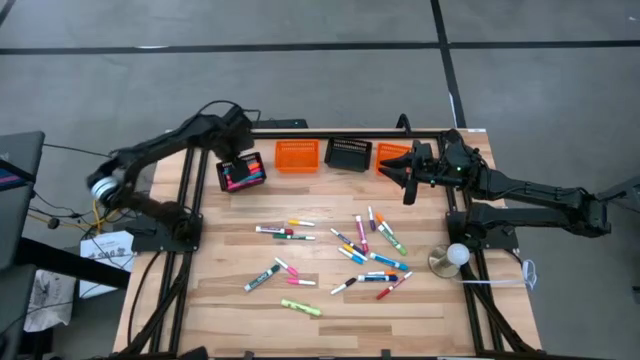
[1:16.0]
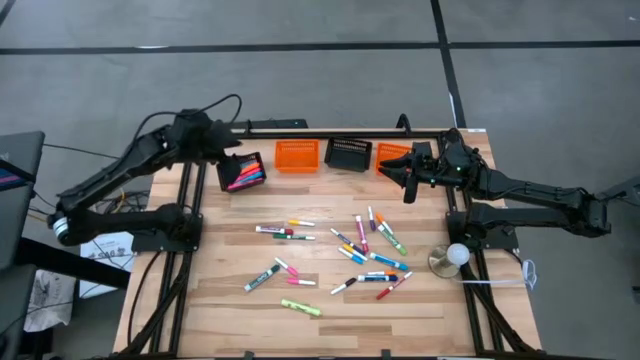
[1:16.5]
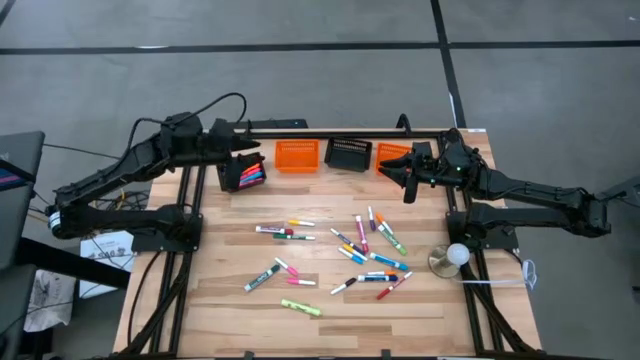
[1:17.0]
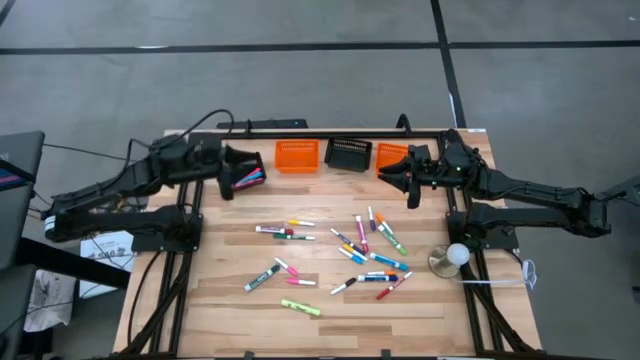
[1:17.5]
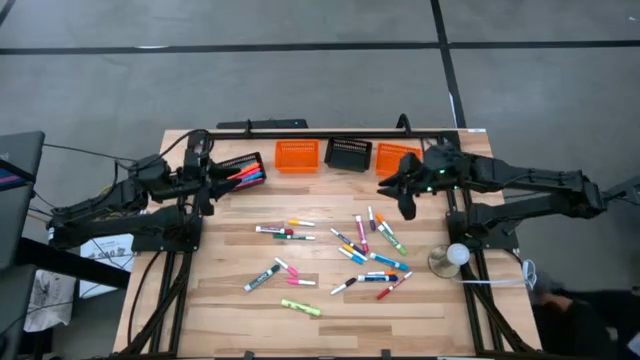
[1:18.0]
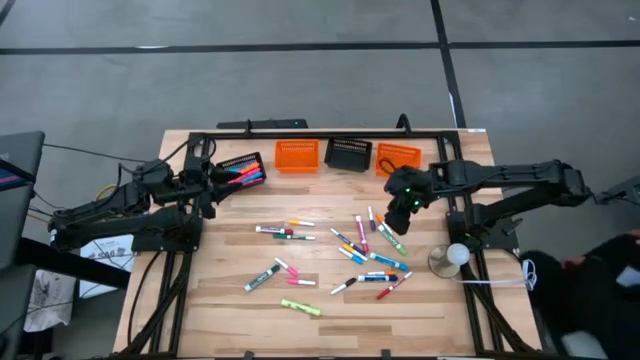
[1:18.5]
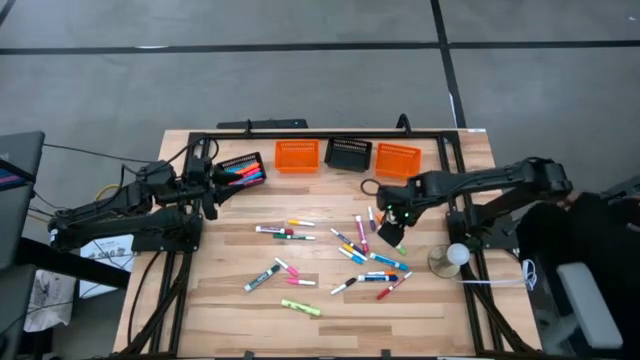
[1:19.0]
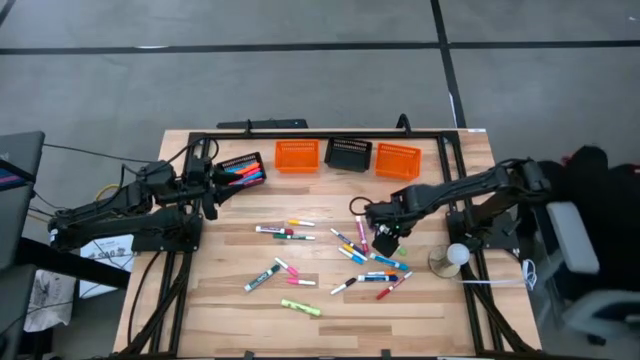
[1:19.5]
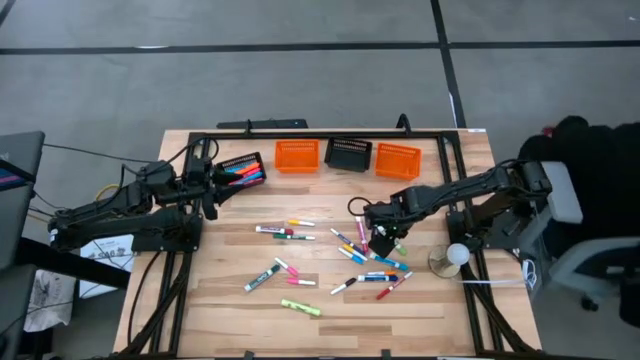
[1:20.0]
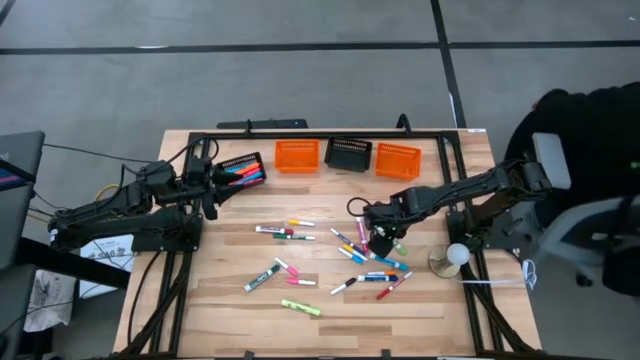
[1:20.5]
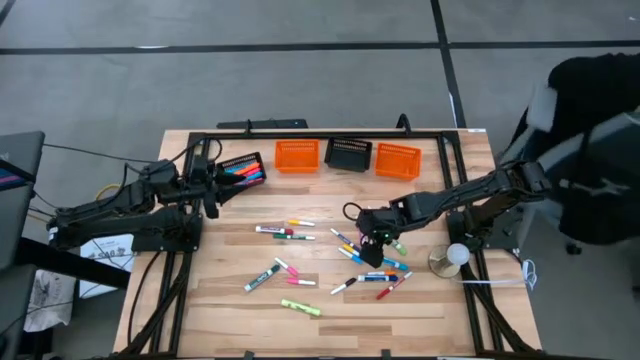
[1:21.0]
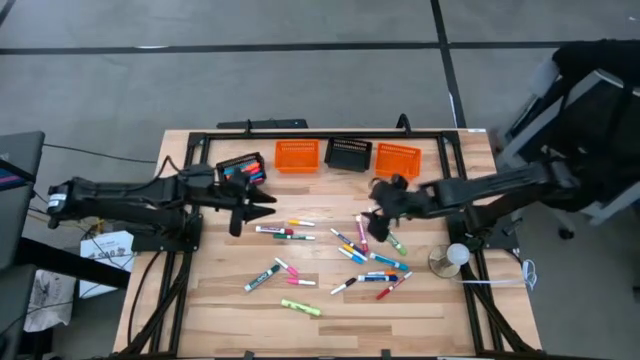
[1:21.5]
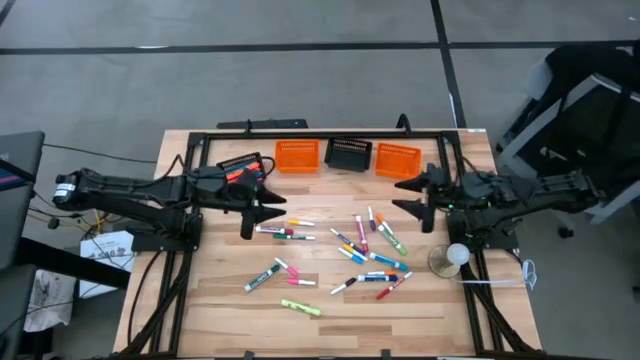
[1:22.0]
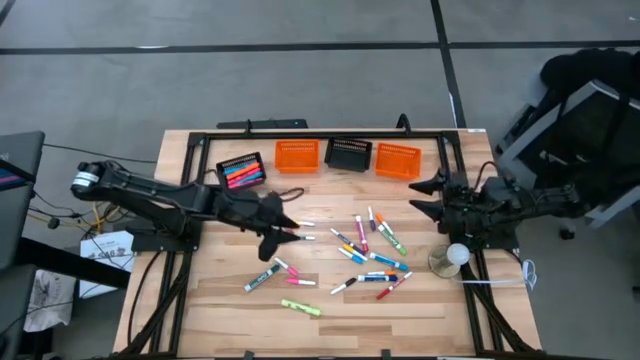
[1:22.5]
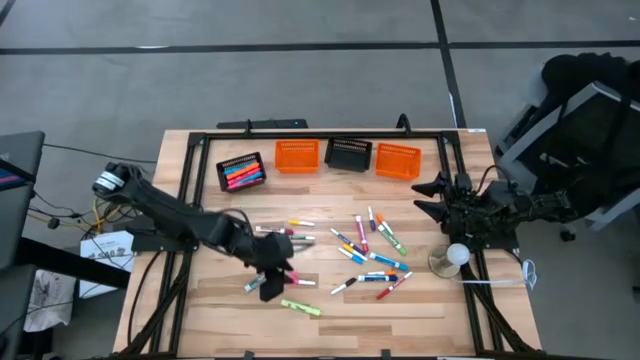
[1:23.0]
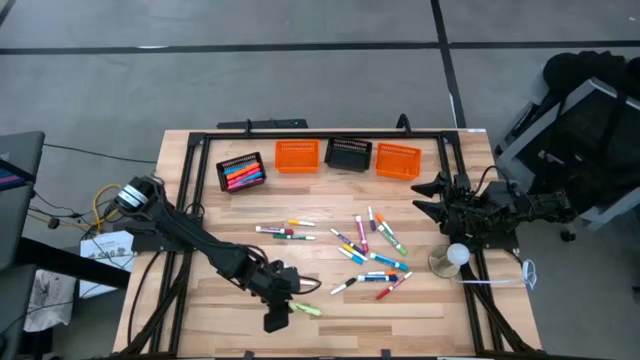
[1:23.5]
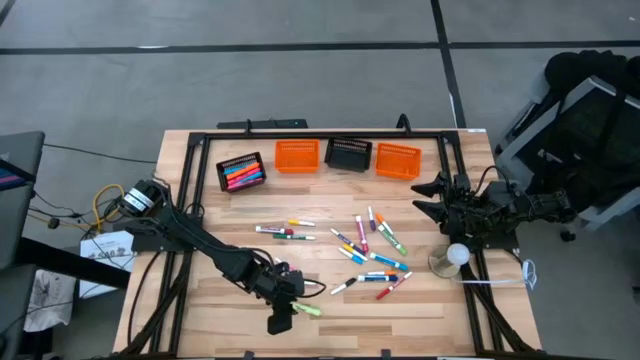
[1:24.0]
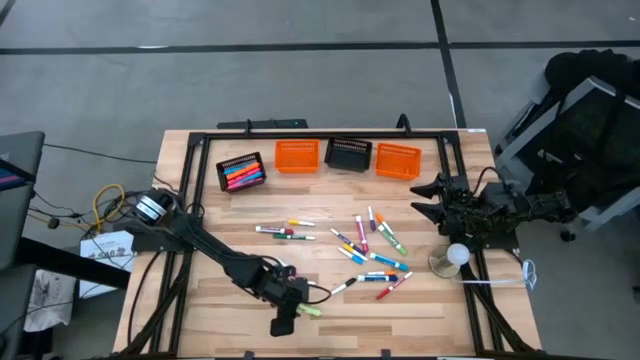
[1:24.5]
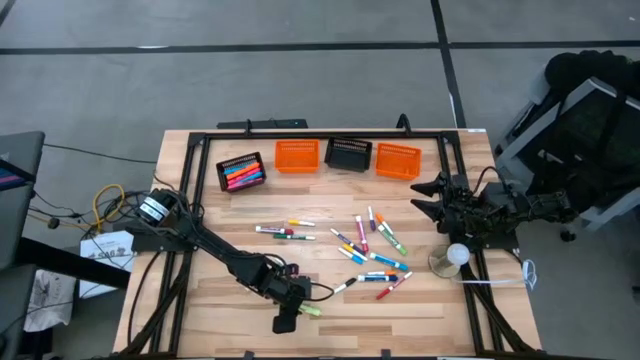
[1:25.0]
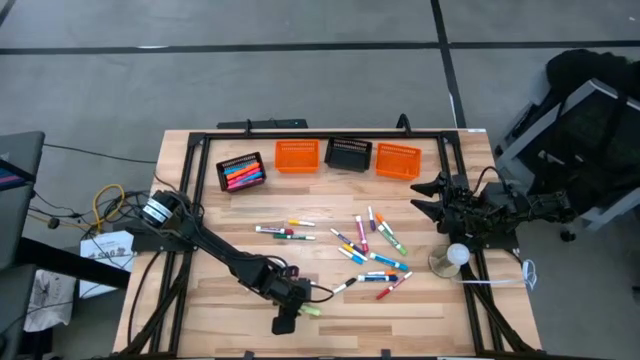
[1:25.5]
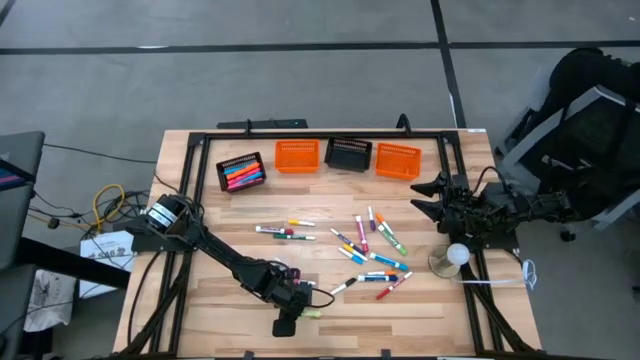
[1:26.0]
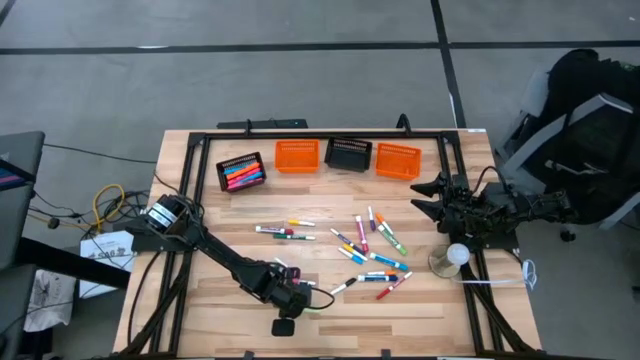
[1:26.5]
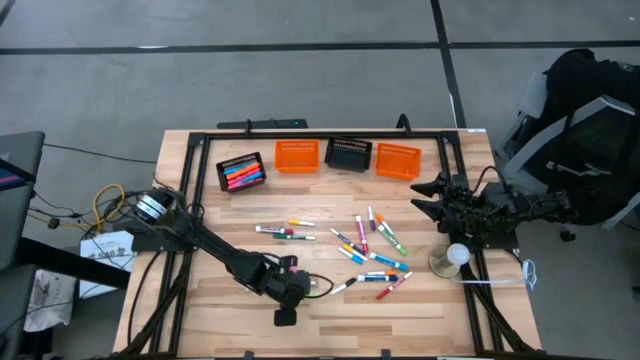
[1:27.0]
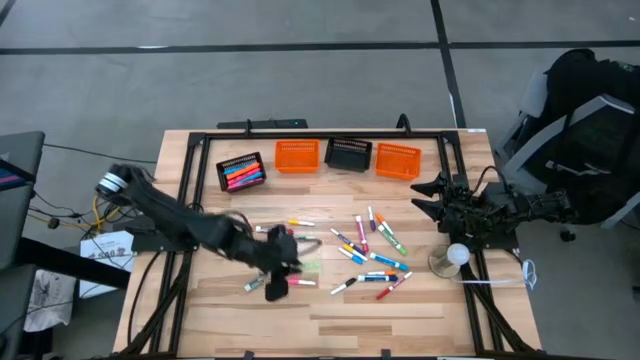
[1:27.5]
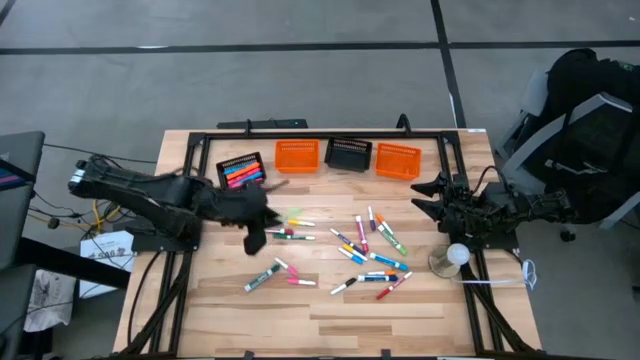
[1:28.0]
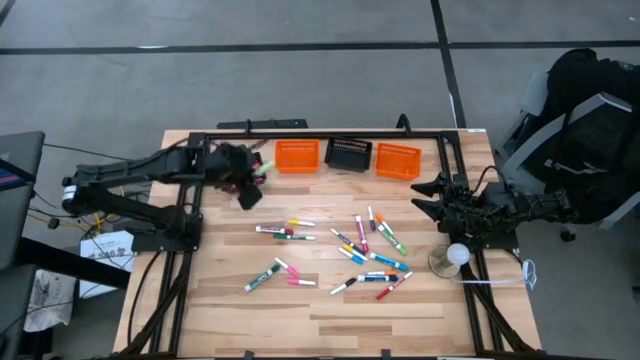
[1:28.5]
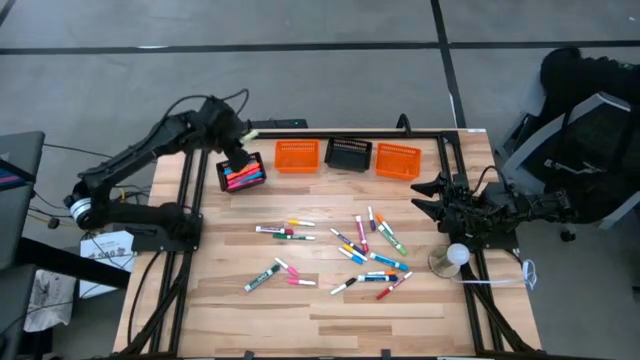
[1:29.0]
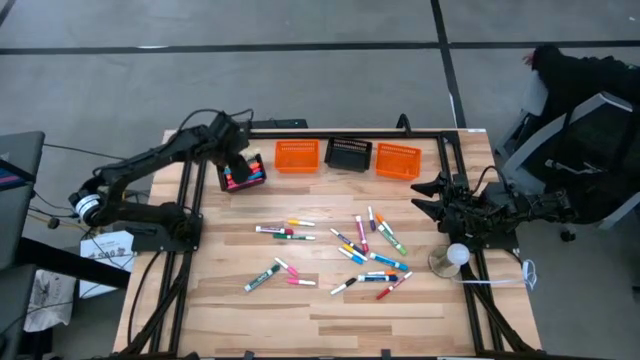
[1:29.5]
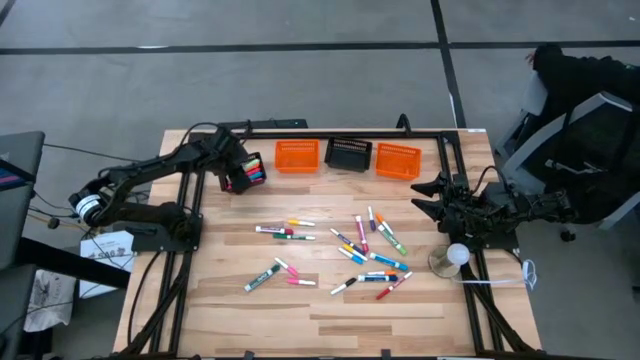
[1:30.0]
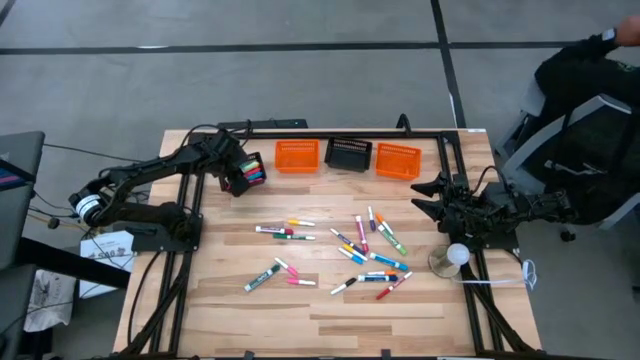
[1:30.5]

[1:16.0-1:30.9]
Task: Pick & Place Markers
Put the large light green highlighter pen into the left black bin

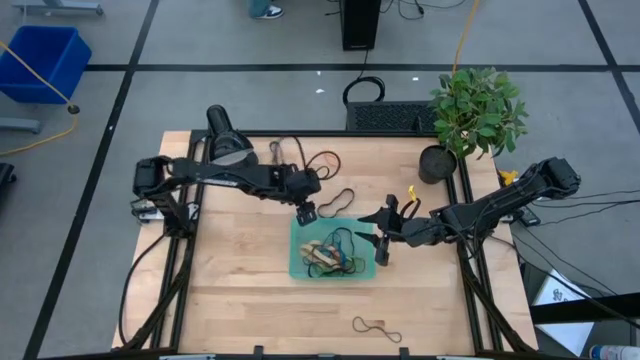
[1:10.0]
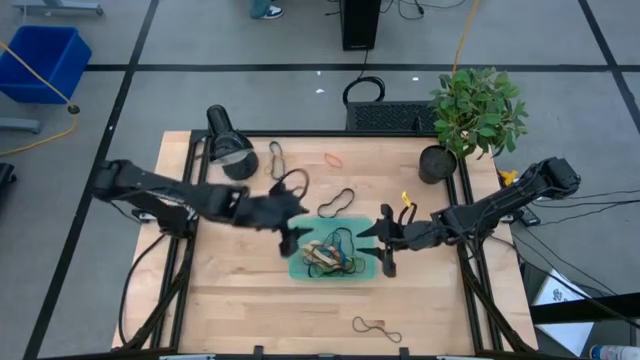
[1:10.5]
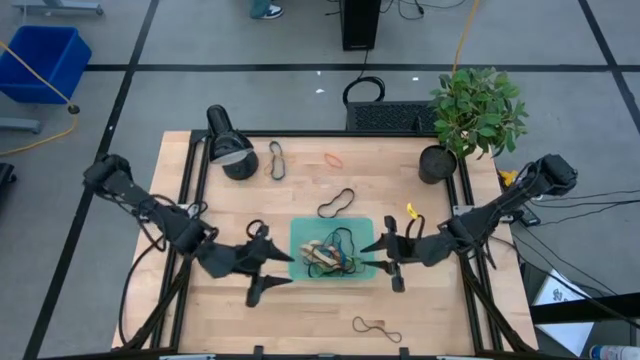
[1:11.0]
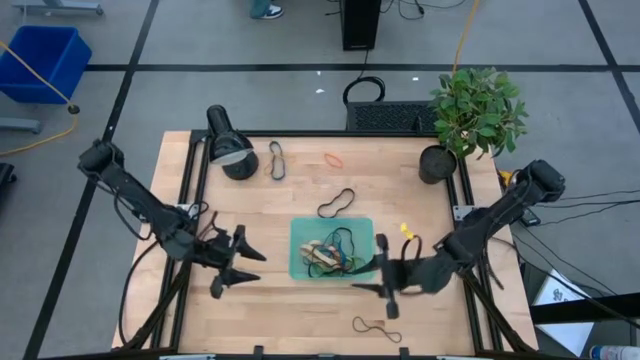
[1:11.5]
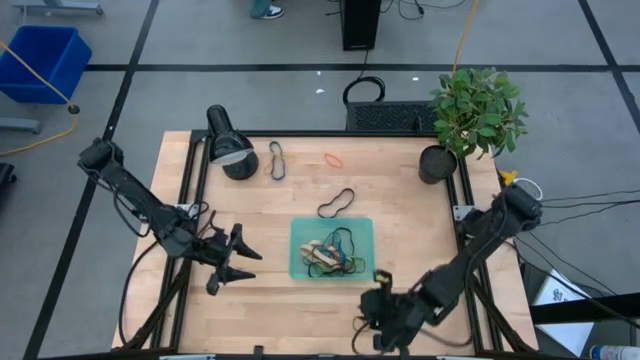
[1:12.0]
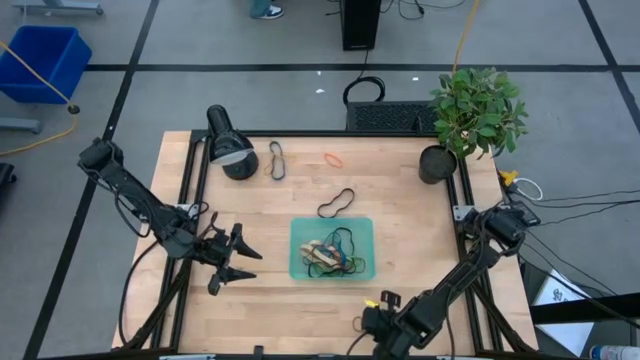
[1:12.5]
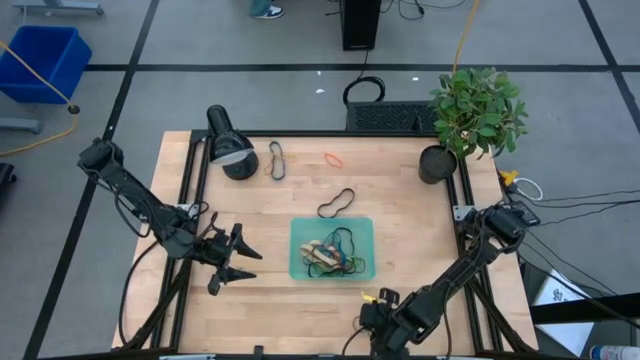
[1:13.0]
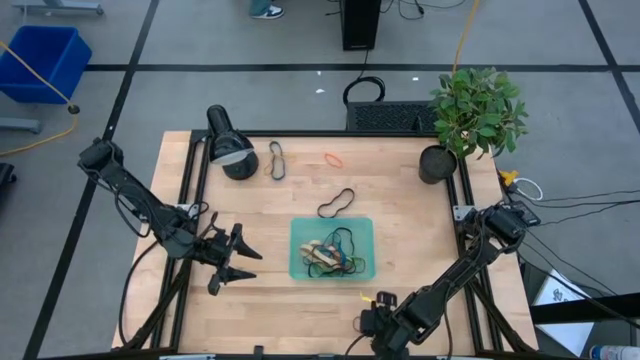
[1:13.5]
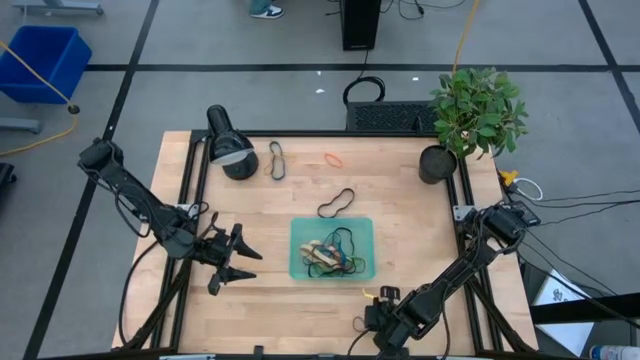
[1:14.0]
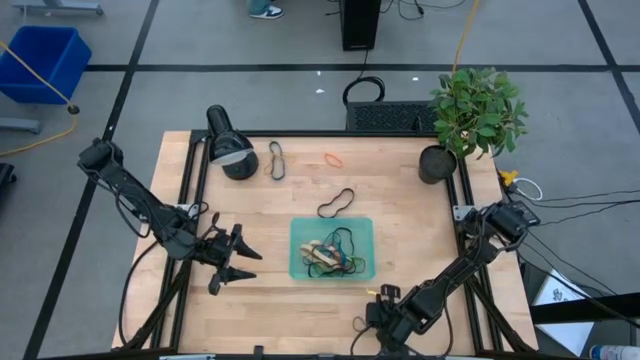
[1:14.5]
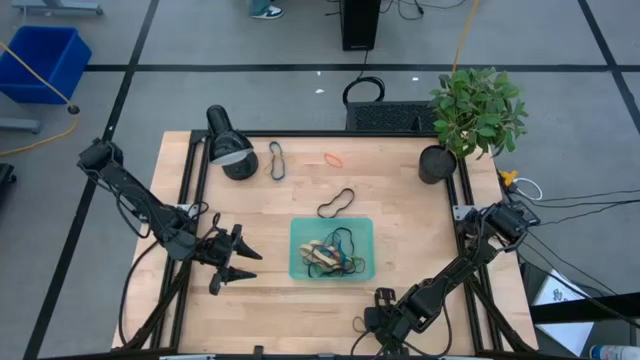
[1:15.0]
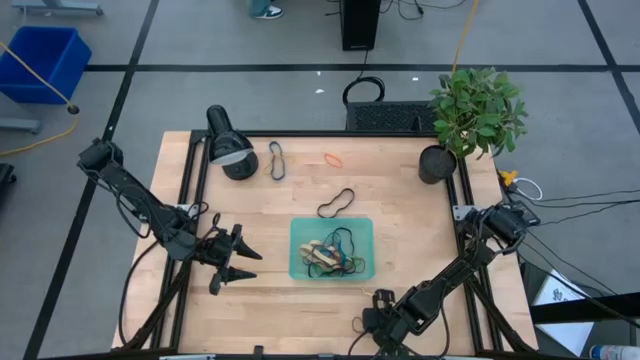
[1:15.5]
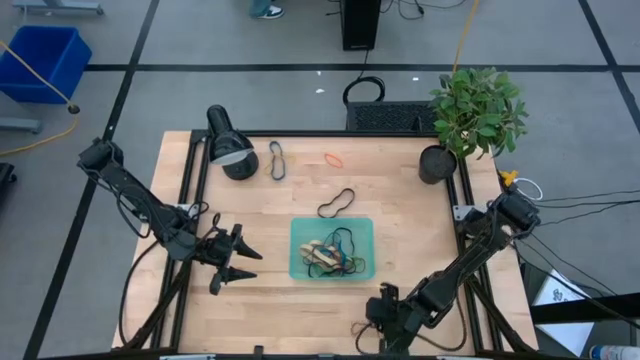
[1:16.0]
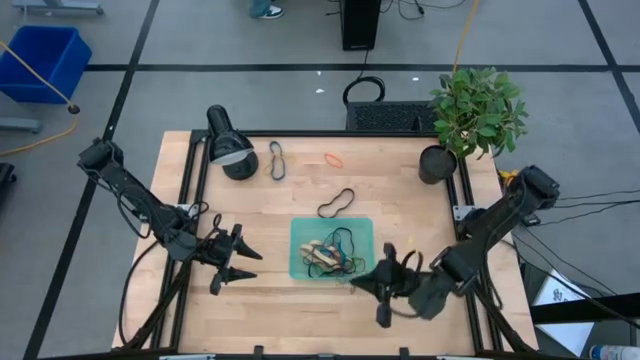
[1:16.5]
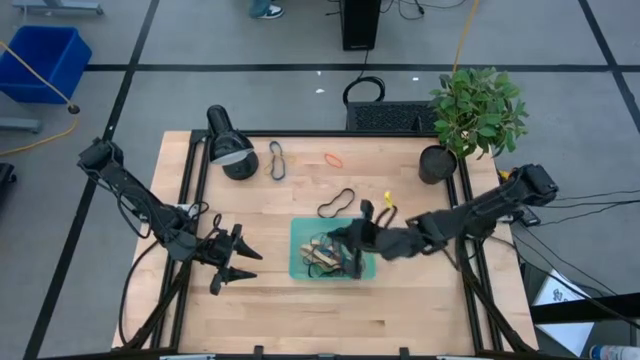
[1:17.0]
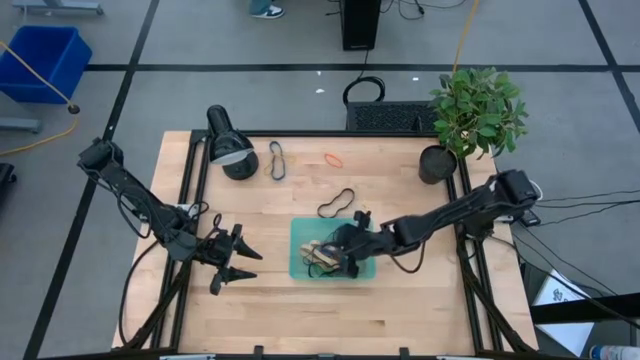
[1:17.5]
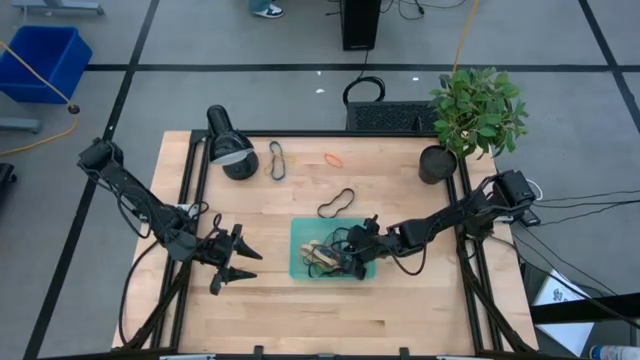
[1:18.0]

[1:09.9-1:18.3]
Task: Pick and place rubber bands into bin
Put the purple rubber band into the green bin
